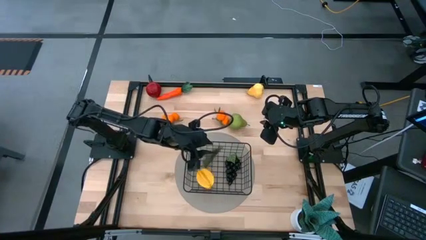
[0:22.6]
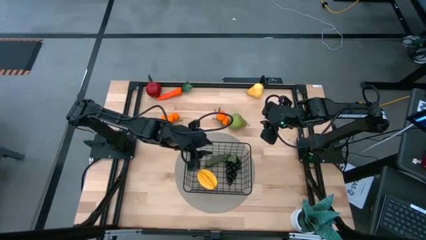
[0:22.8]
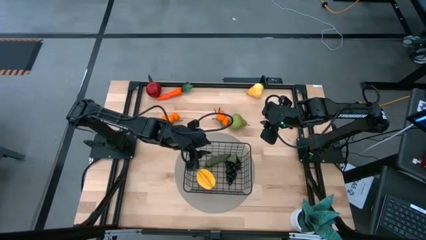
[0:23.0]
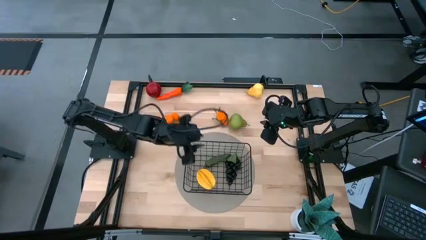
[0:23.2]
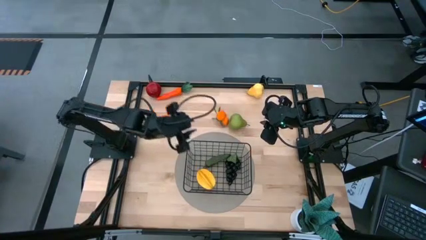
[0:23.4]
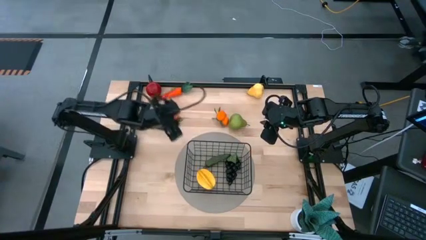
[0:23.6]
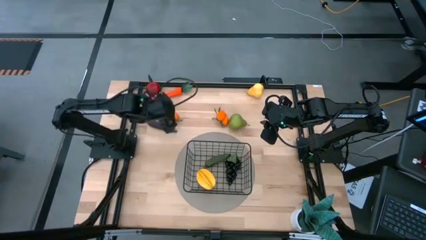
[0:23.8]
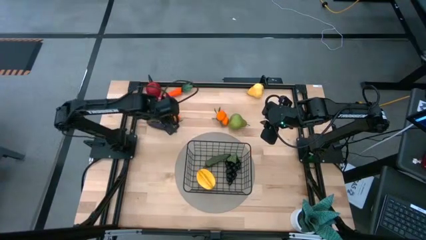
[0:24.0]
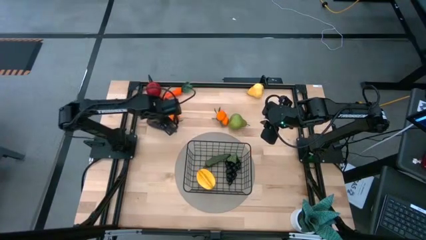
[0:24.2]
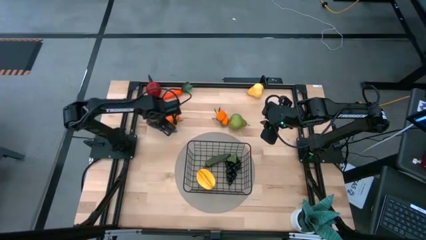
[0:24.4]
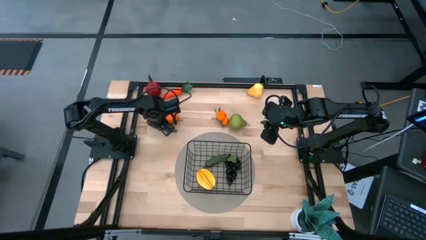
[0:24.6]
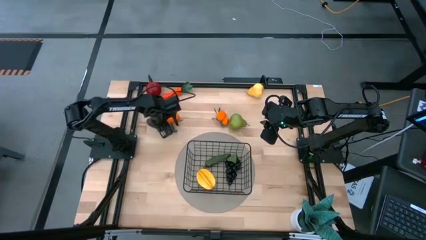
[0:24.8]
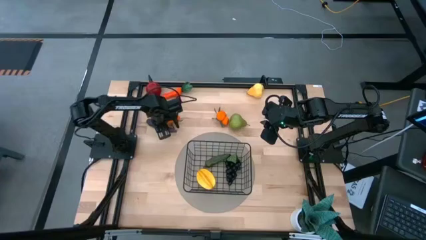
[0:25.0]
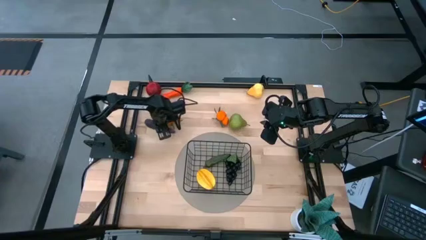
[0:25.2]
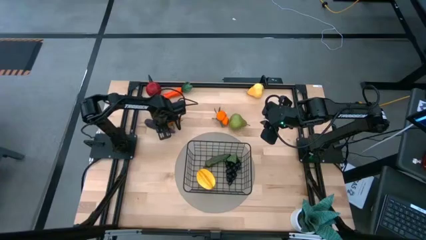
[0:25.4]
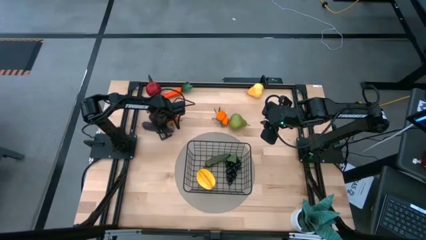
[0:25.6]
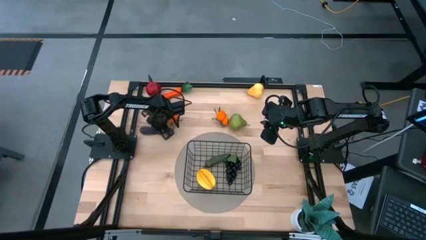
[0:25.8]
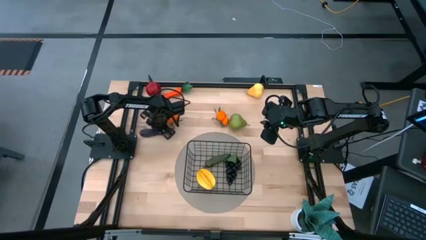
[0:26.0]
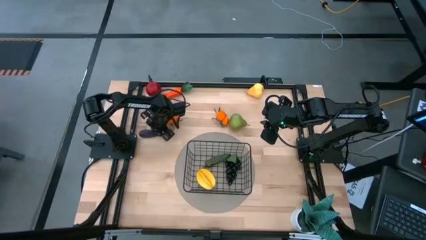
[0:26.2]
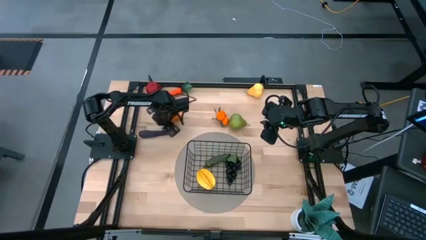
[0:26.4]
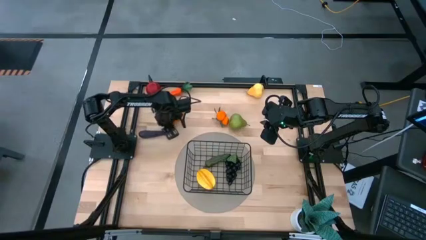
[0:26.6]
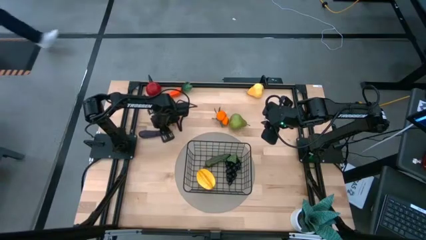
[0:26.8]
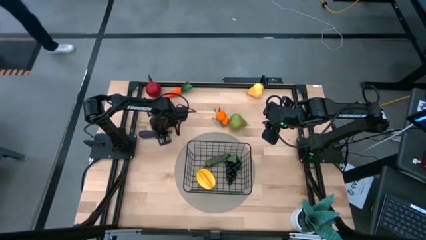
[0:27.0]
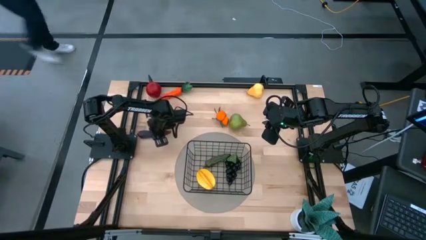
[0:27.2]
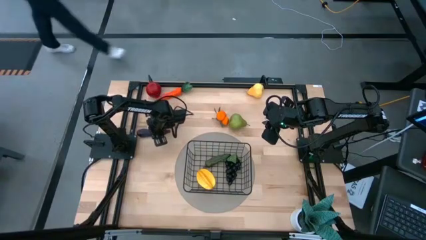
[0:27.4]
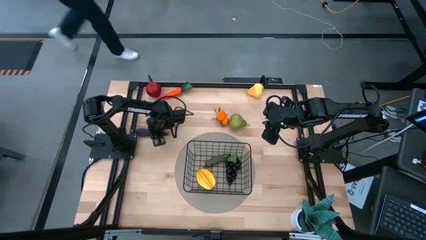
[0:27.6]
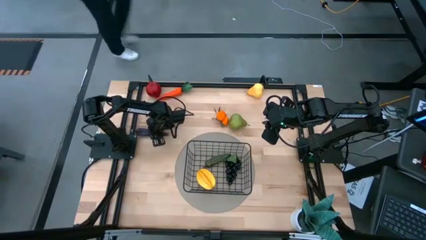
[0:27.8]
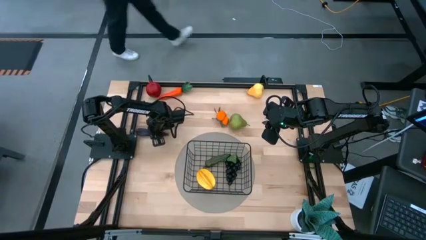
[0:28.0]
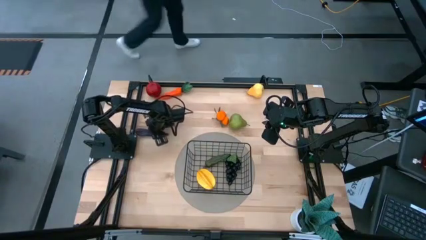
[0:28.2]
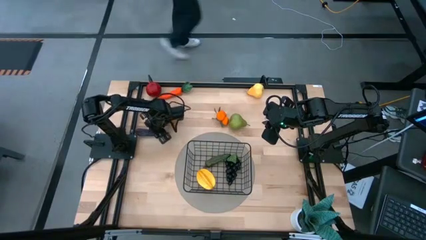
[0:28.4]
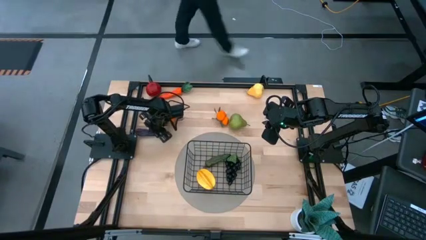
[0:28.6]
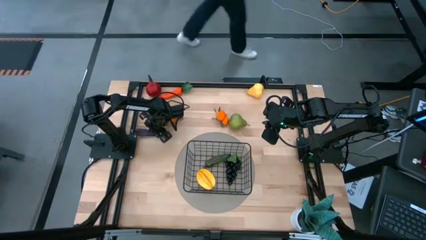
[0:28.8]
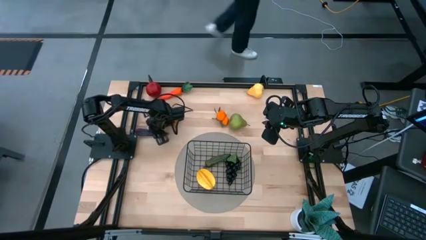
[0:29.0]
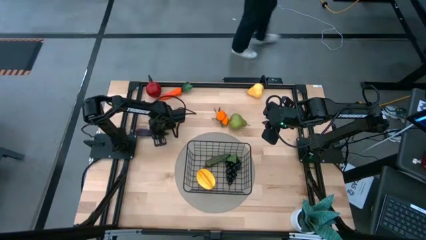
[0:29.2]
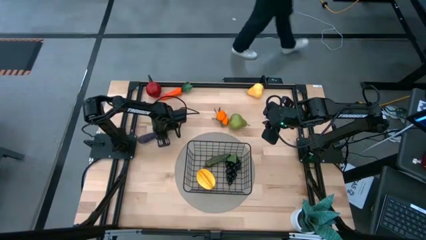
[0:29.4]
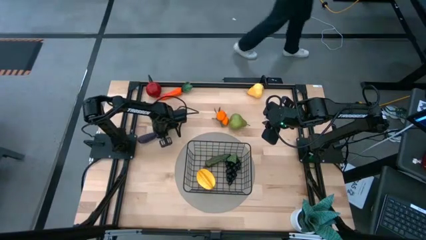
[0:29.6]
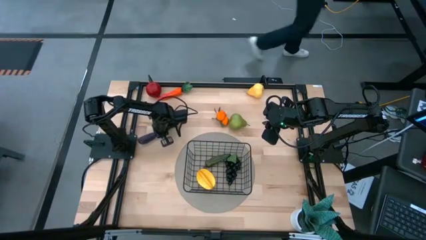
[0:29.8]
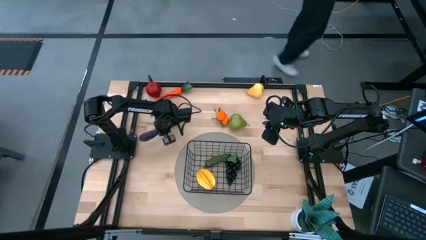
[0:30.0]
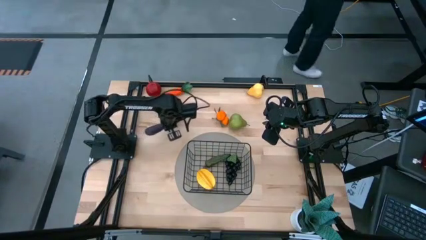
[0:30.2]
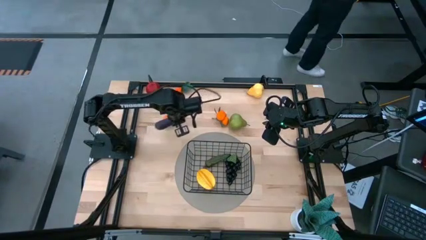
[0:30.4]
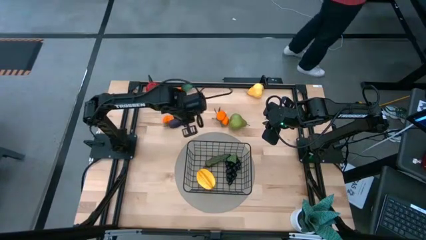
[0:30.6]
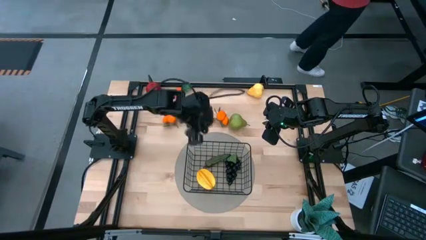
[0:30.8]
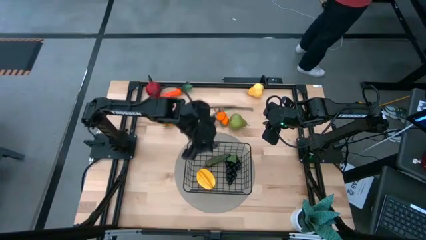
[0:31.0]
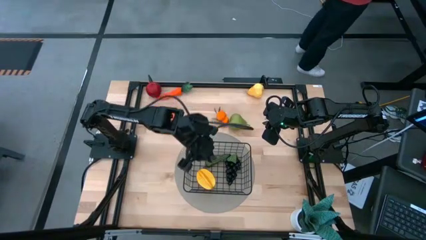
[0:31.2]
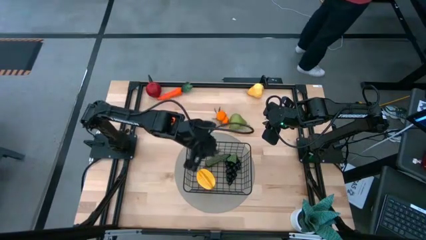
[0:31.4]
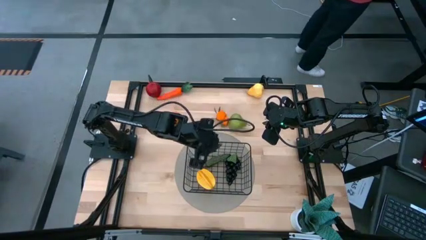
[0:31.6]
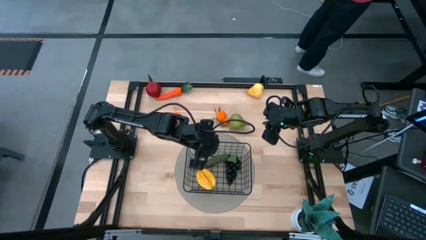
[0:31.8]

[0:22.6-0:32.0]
Task: Build produce basket
Put the eggplant into the wire basket

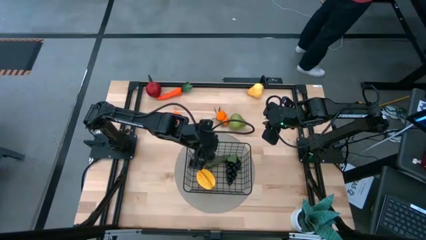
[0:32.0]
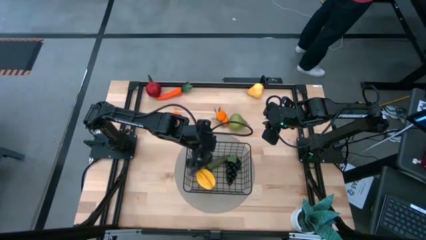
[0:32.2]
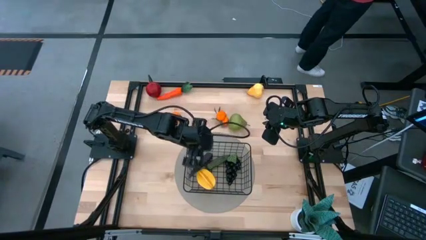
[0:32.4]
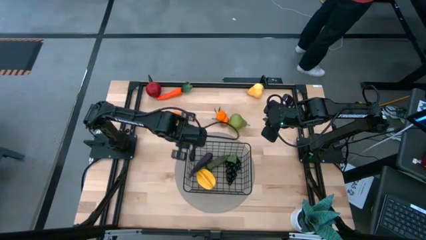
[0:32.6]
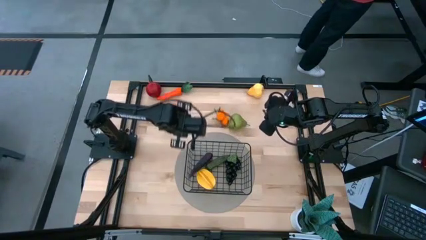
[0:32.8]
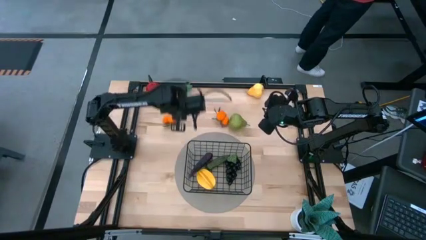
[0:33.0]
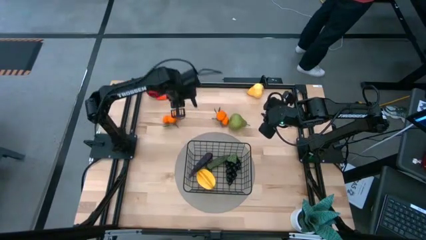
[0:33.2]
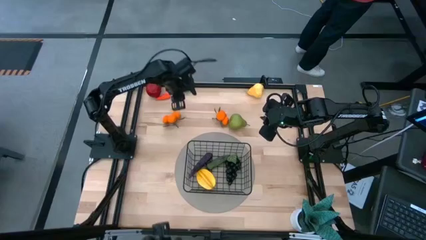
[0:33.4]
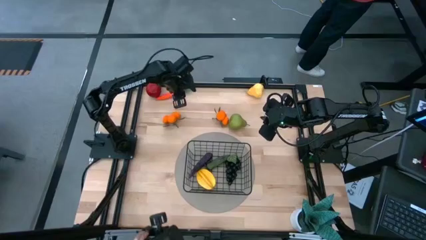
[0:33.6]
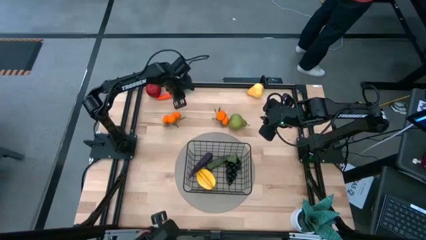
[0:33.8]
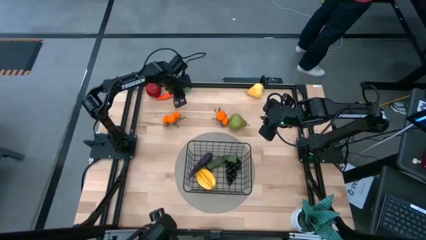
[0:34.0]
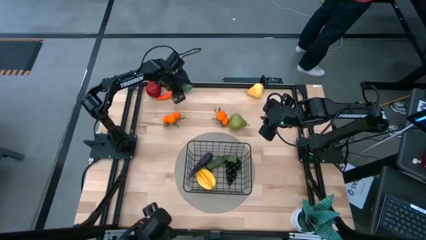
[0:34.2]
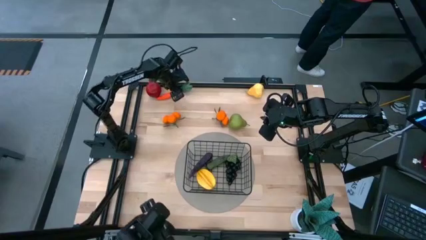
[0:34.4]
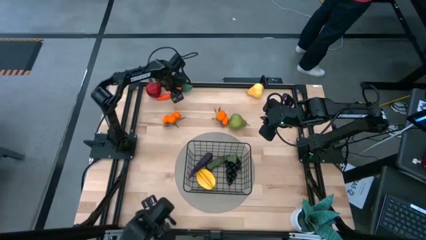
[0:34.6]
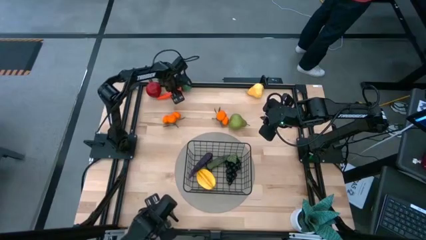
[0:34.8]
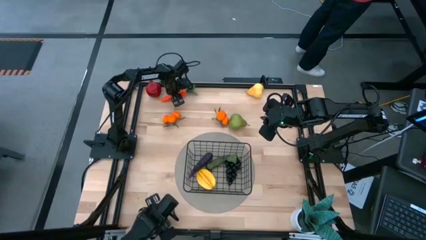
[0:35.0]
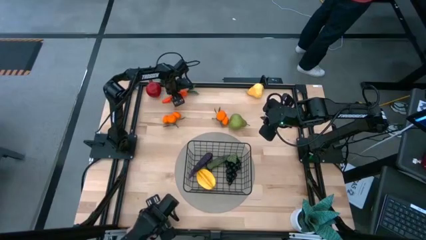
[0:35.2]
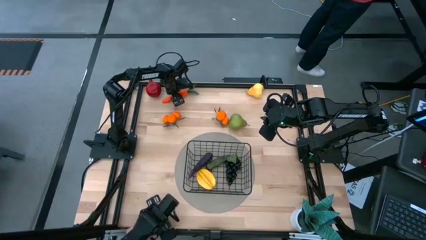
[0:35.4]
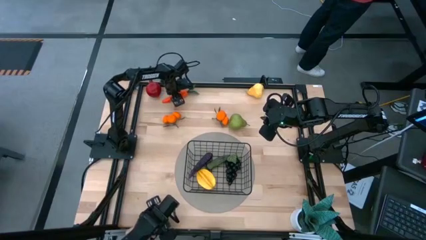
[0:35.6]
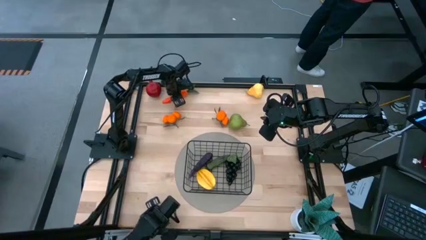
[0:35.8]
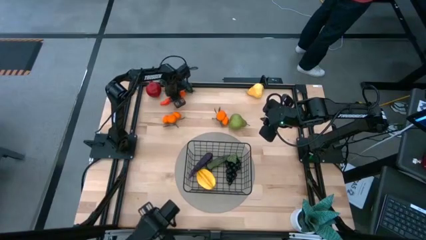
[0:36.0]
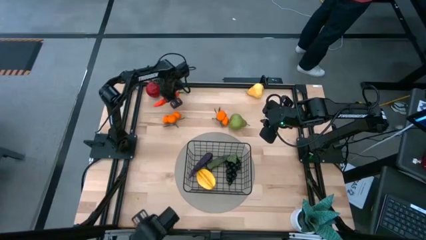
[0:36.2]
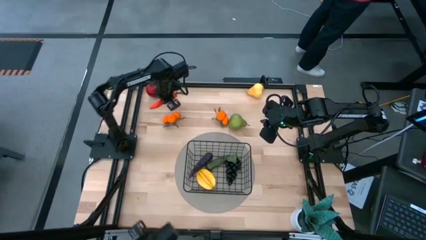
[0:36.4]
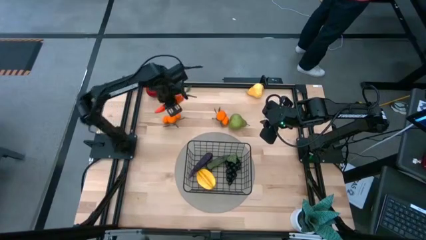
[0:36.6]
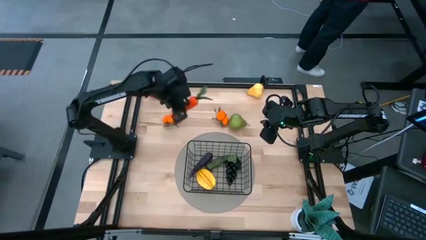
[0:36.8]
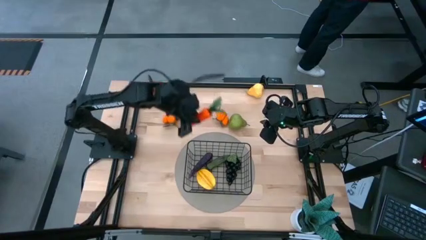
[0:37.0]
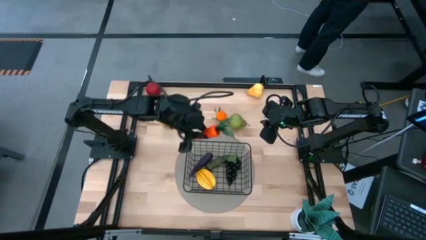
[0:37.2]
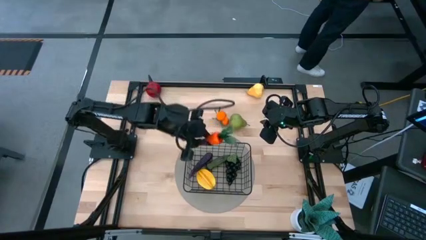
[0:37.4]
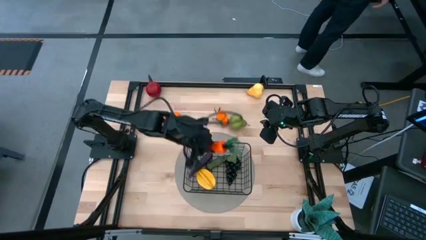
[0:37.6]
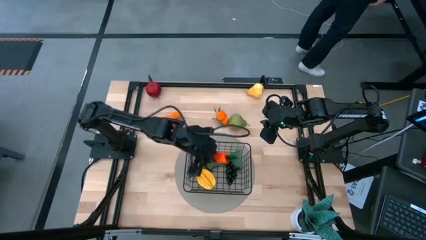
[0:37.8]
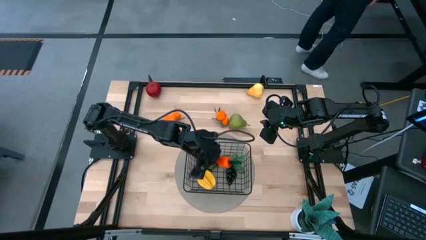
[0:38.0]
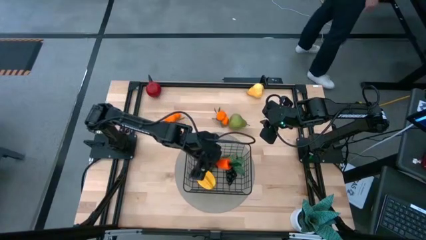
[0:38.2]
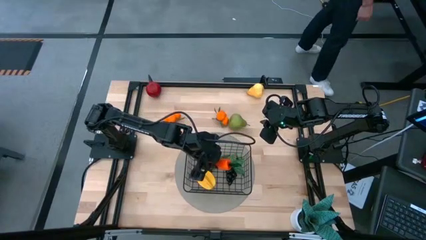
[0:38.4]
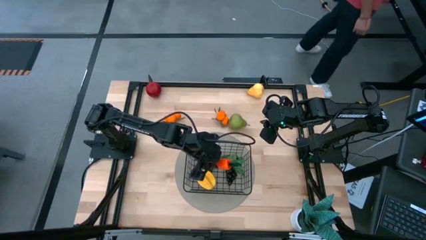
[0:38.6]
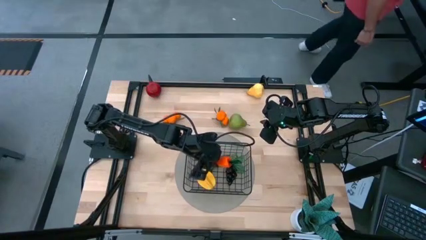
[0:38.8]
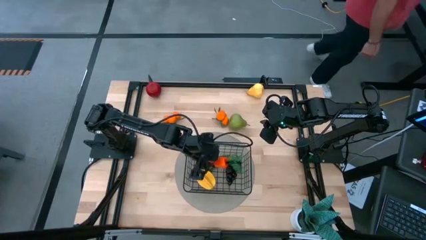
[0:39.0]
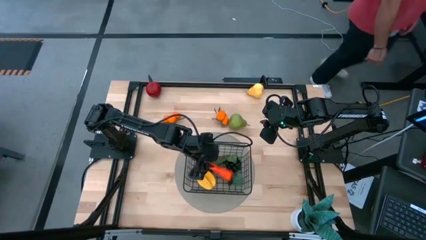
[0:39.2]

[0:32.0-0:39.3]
Put the carrot into the wire basket
